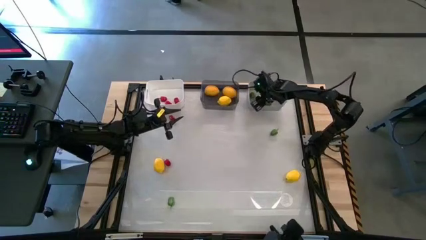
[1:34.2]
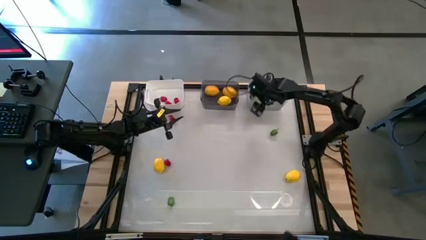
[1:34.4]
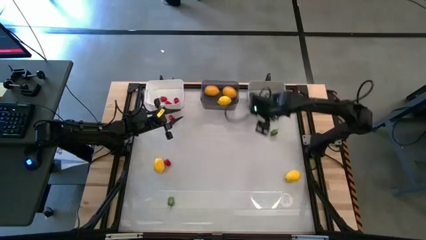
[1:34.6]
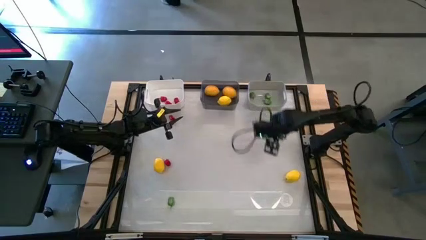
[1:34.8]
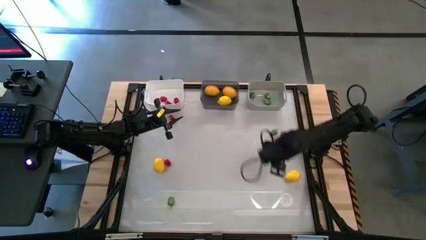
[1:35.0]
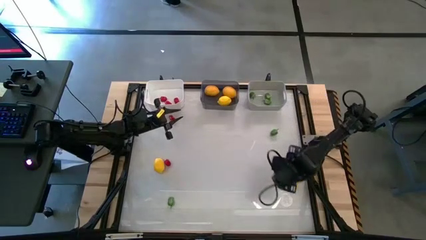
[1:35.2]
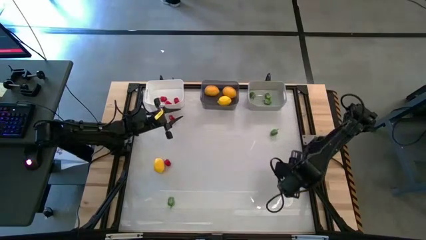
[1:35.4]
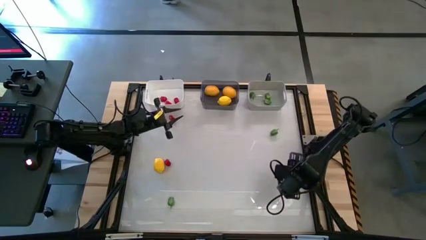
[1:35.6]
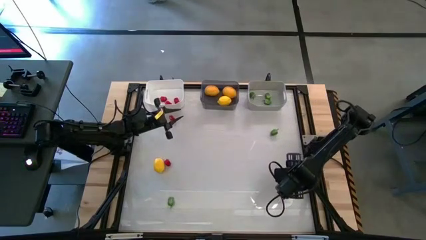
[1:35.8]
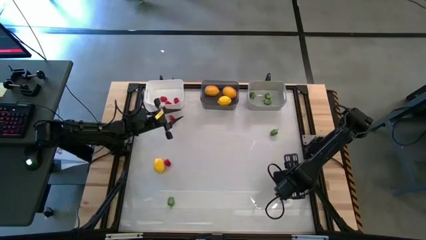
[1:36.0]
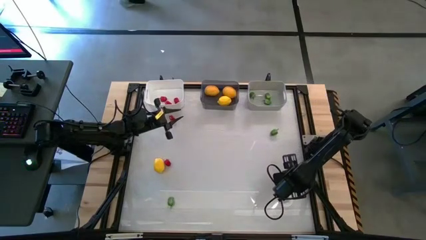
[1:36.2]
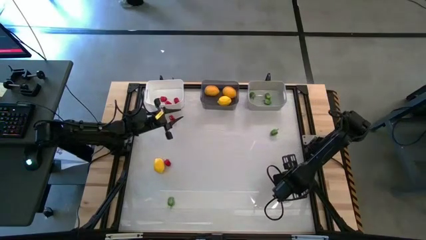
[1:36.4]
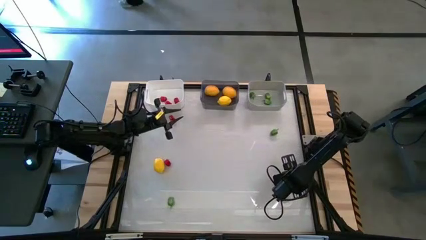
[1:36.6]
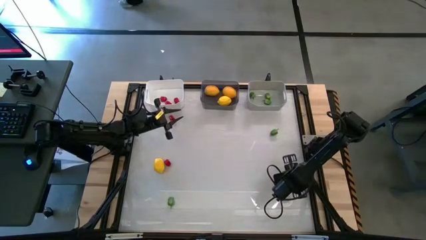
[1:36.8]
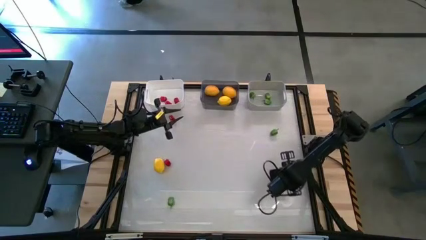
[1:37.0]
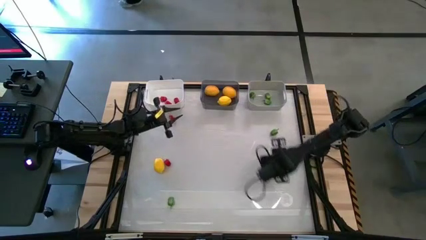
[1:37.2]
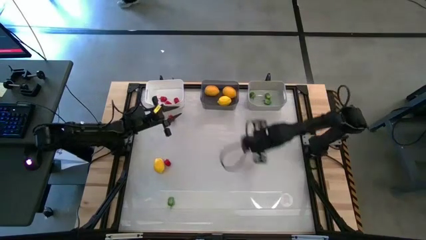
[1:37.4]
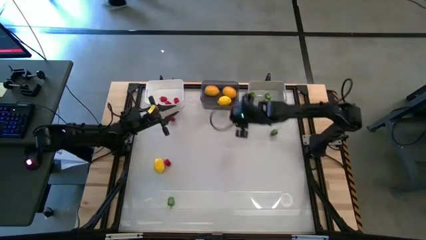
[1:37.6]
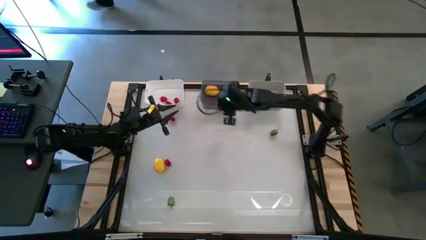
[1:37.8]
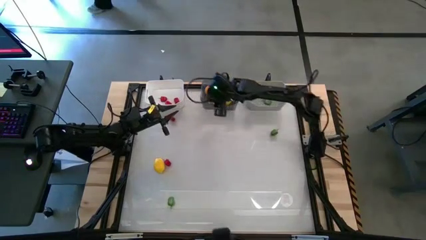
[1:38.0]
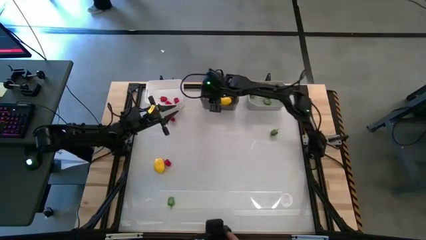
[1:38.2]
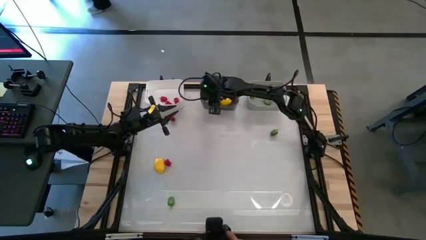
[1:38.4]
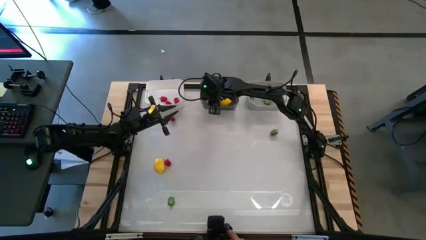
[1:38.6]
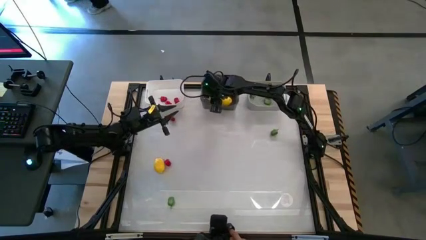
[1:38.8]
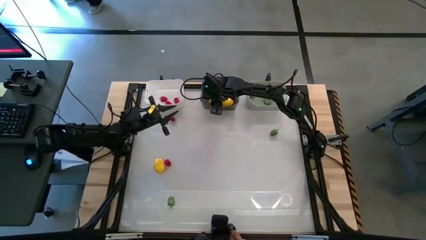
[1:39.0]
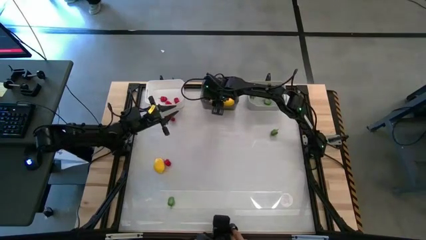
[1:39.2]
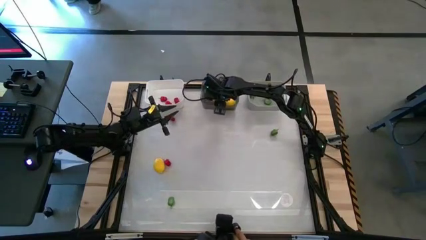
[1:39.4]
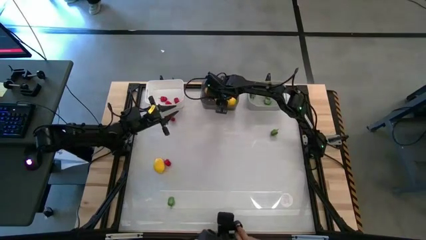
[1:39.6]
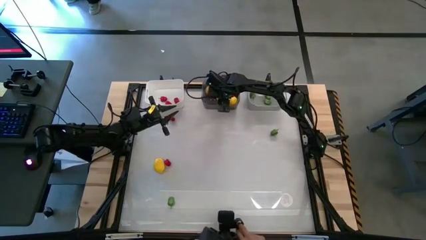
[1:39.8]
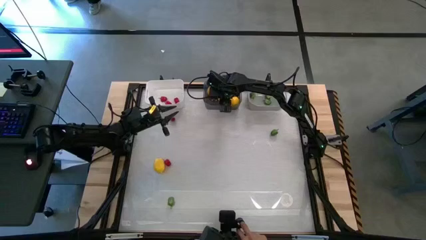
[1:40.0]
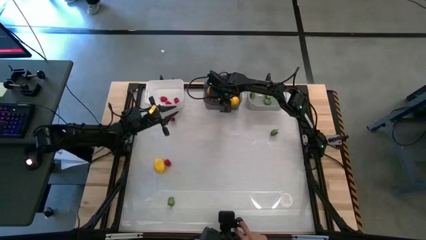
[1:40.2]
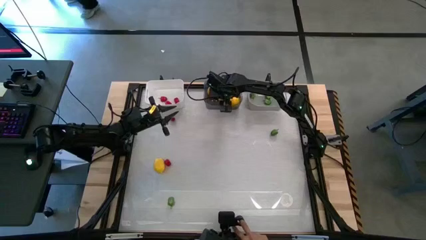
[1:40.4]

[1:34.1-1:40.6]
Task: Sort produce into baskets
Put the lemon into the black bin

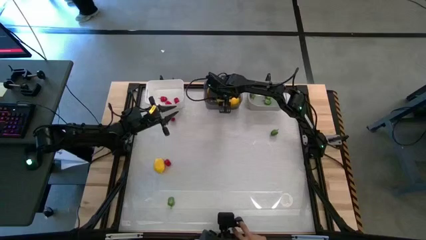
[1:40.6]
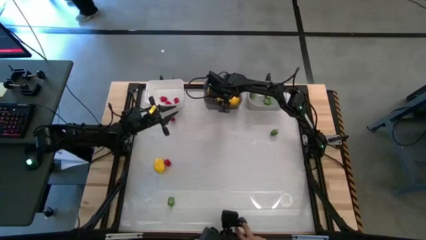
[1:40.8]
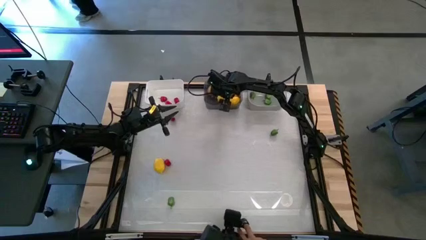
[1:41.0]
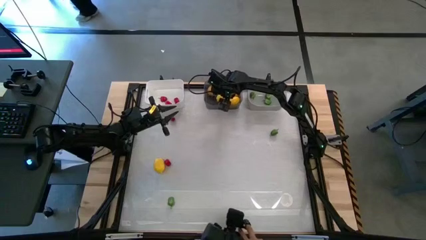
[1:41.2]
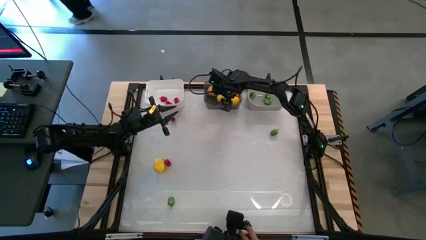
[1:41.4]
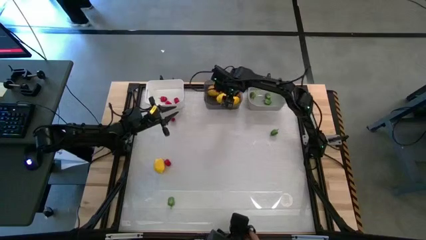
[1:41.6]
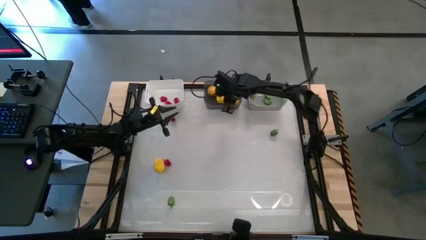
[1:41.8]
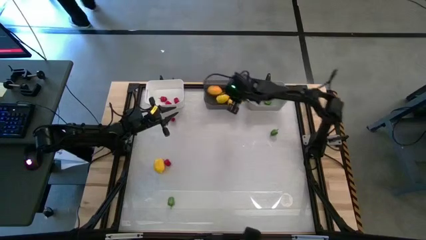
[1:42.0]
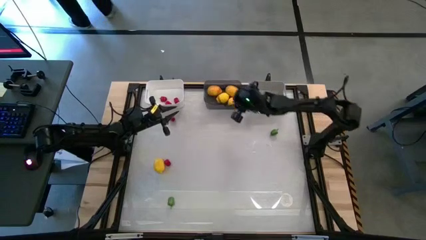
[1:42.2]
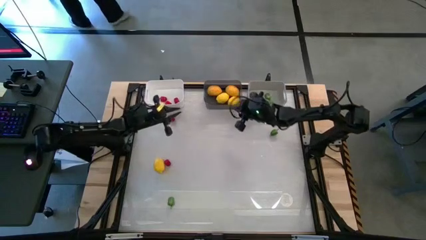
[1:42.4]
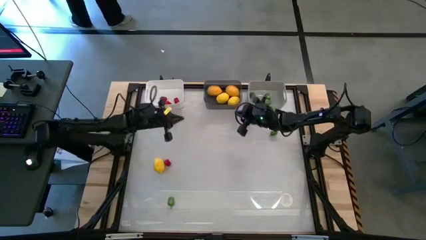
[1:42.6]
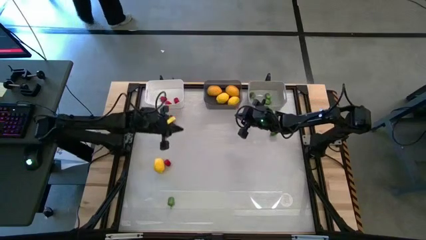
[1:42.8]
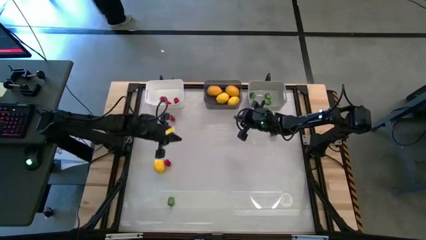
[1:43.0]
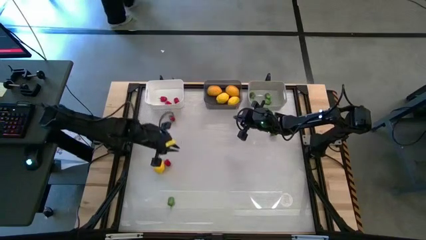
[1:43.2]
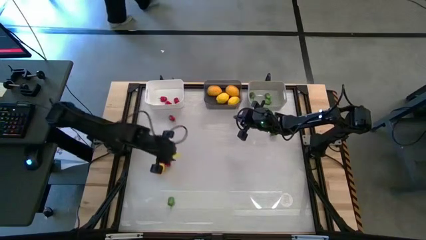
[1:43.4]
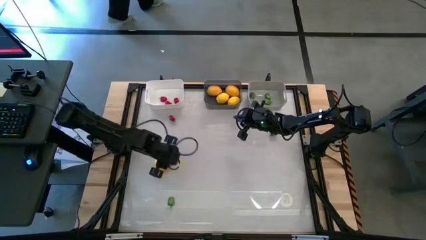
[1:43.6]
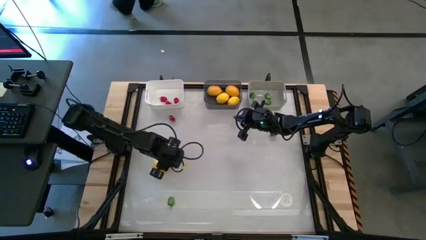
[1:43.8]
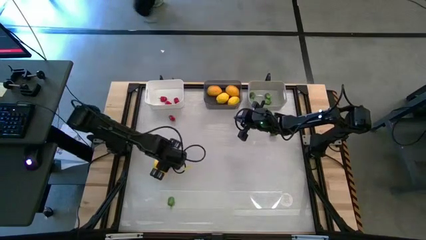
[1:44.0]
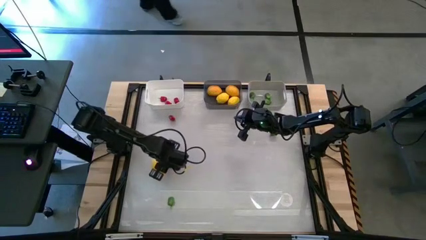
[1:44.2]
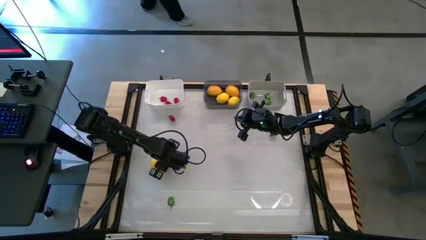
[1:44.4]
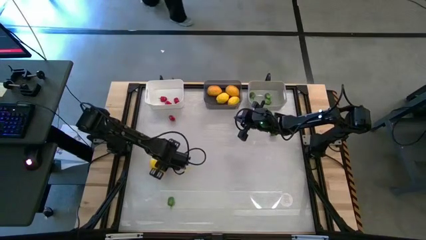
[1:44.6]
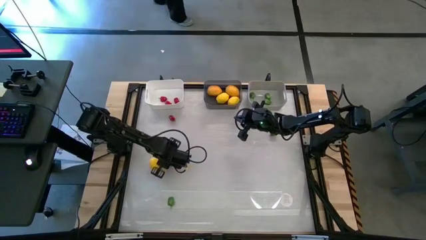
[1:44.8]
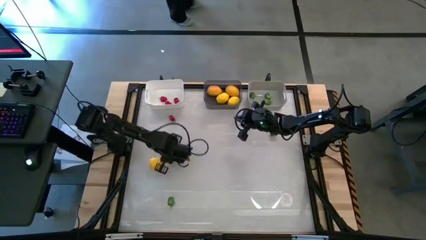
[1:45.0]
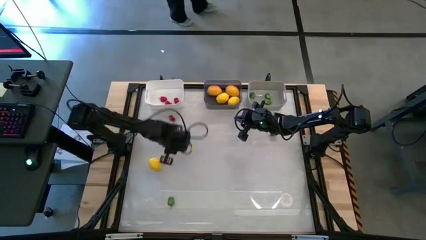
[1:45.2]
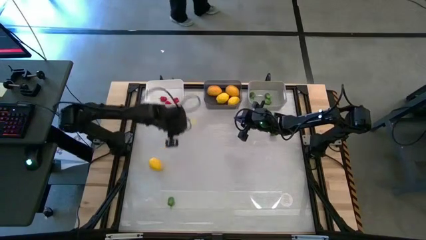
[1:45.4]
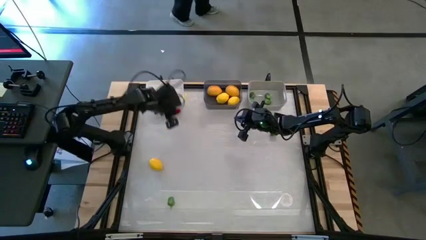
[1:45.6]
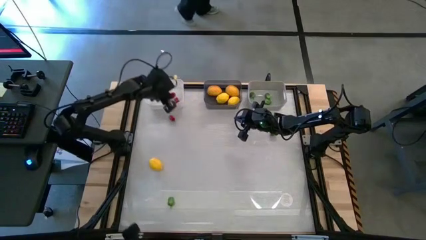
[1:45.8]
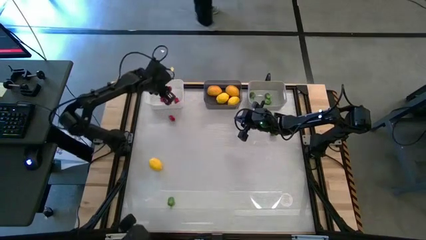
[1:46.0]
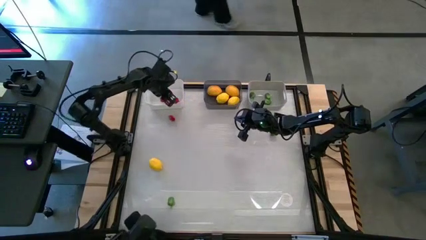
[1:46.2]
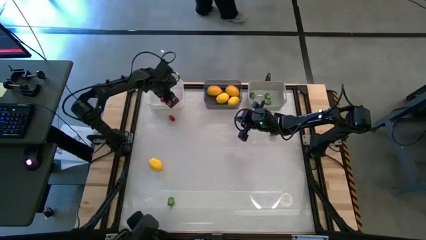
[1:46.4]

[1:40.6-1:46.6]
Put the red bell pepper into the white bin

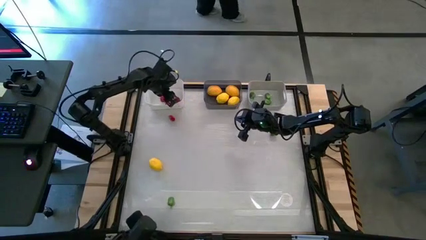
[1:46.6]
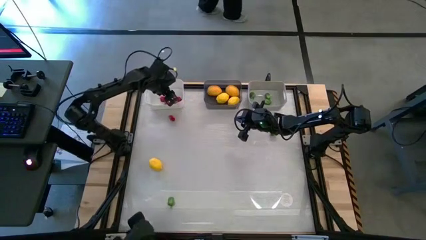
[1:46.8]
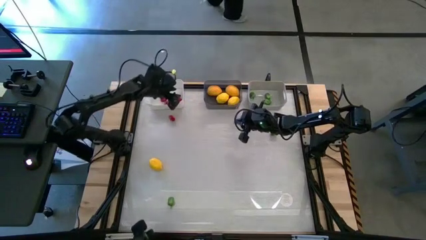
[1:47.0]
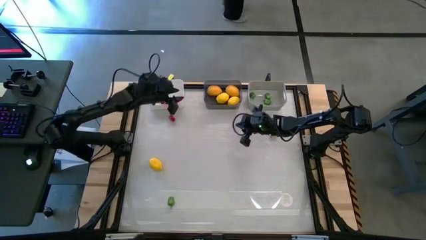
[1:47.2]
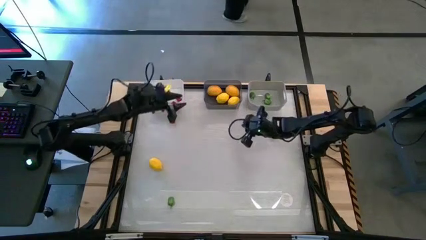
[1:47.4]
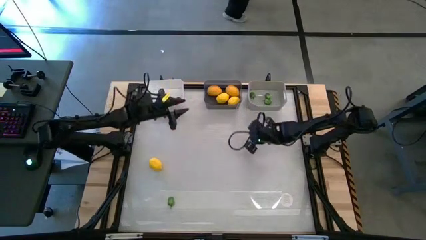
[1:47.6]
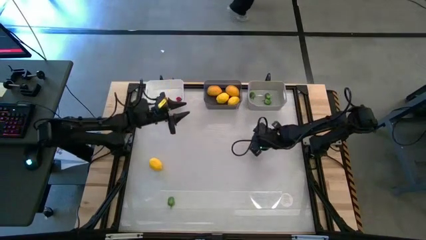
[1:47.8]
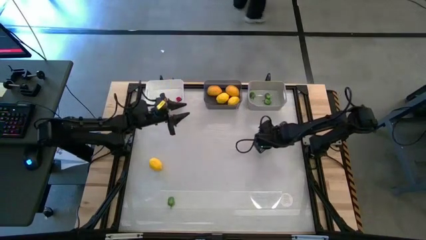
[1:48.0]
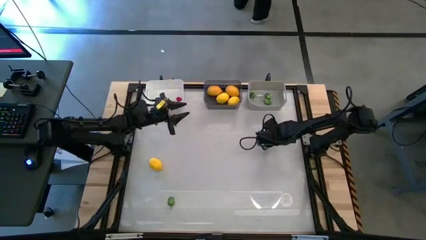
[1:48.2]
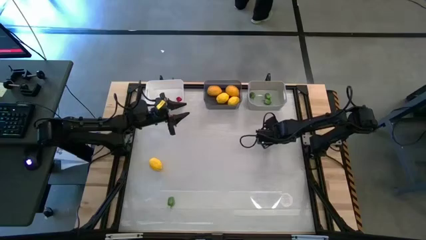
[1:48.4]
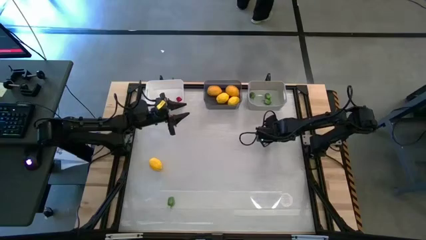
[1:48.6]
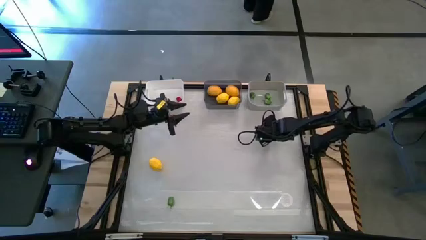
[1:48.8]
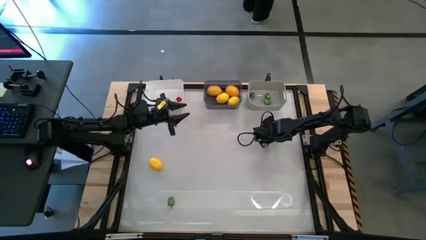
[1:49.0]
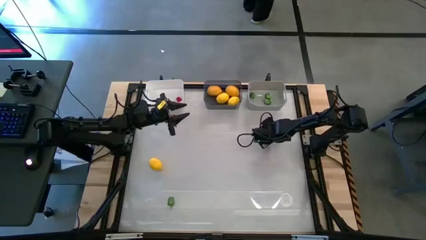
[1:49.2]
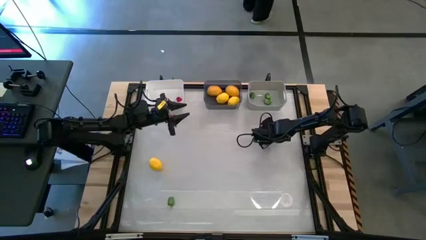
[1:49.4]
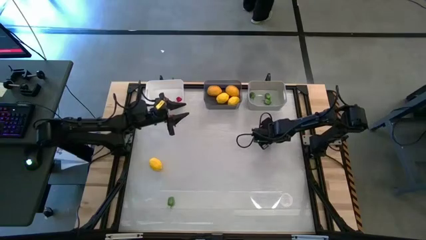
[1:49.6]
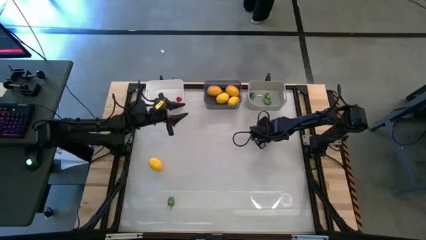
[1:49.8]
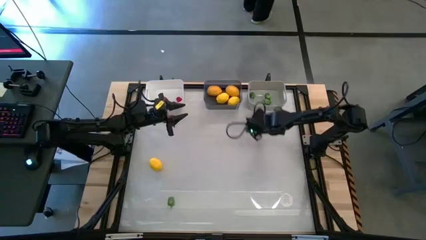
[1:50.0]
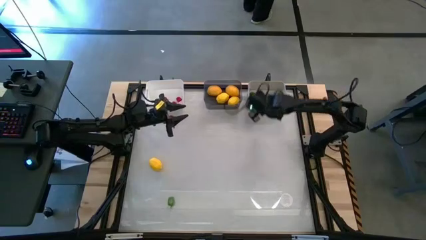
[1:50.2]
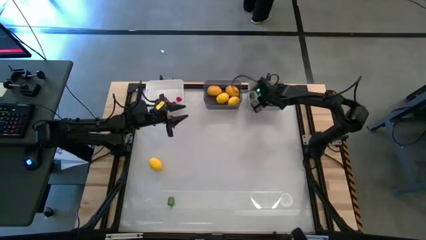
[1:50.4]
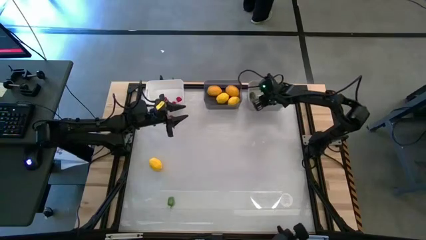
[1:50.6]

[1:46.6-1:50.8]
Put the green bell pepper into the gray bin
